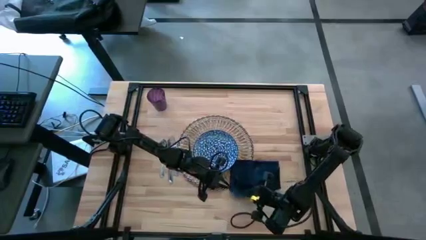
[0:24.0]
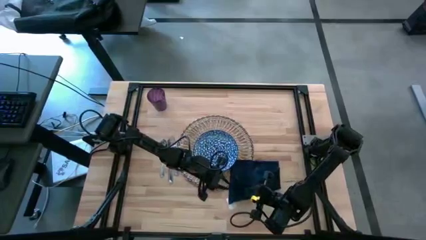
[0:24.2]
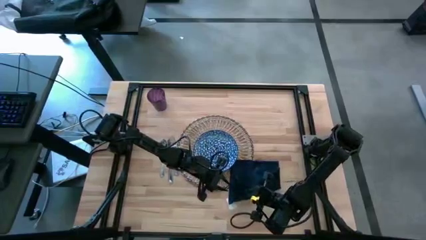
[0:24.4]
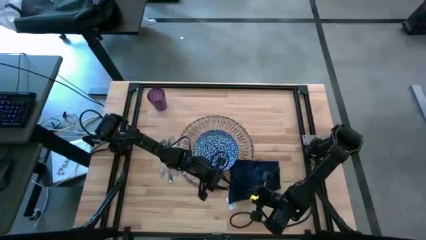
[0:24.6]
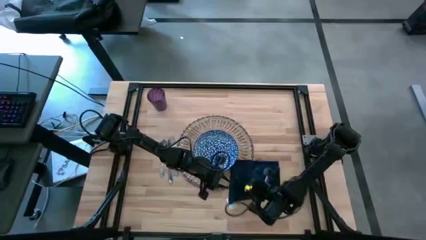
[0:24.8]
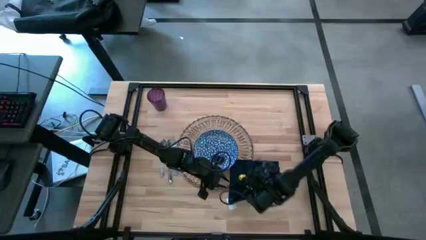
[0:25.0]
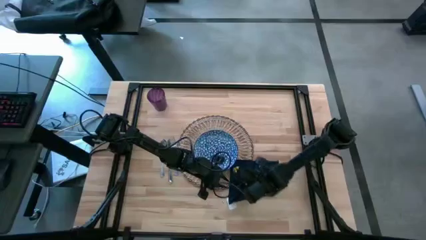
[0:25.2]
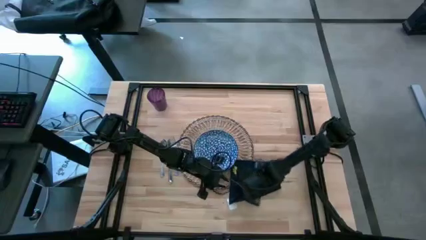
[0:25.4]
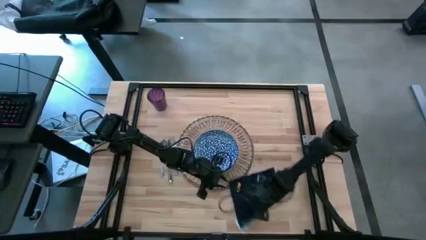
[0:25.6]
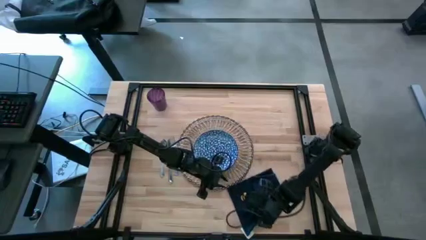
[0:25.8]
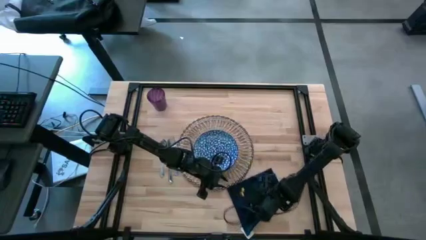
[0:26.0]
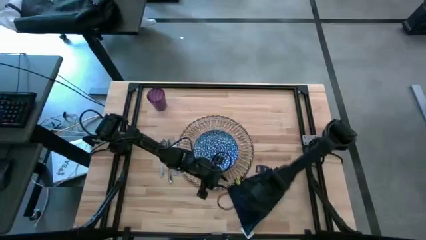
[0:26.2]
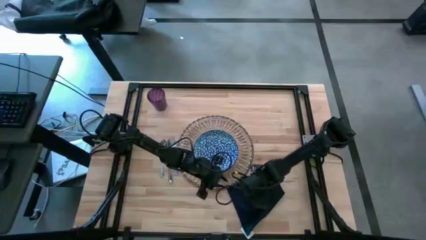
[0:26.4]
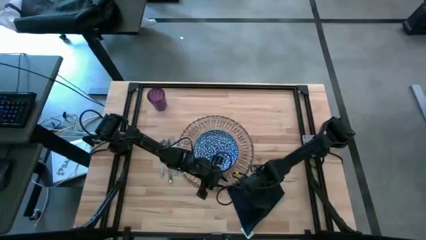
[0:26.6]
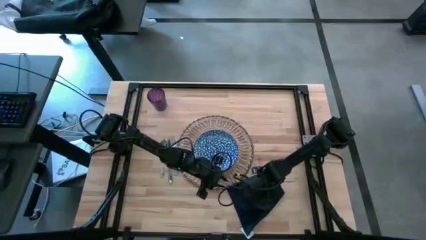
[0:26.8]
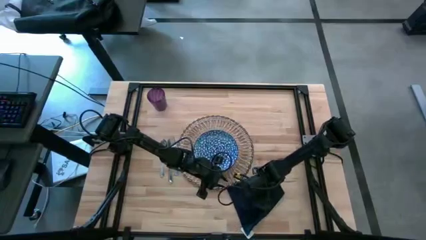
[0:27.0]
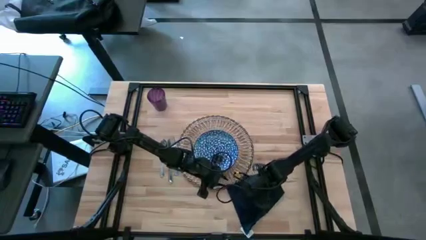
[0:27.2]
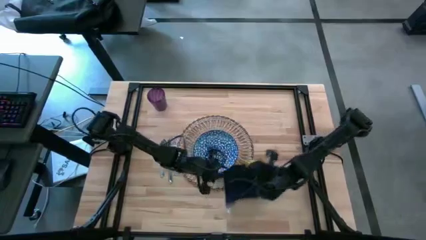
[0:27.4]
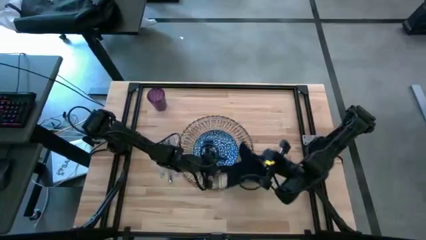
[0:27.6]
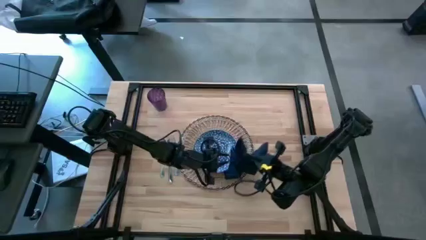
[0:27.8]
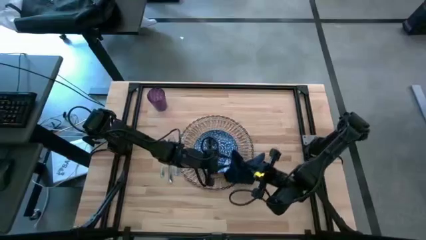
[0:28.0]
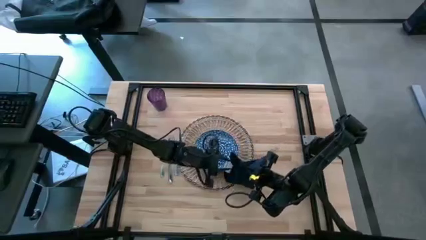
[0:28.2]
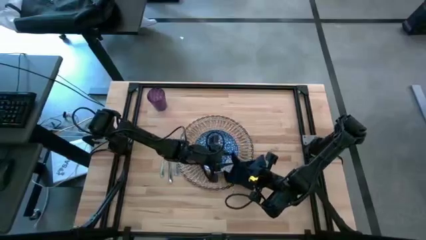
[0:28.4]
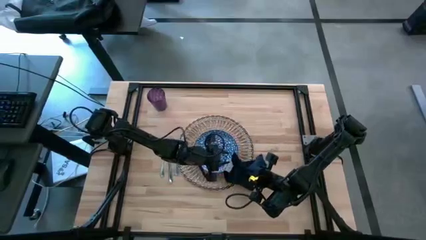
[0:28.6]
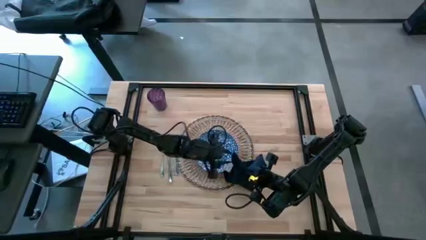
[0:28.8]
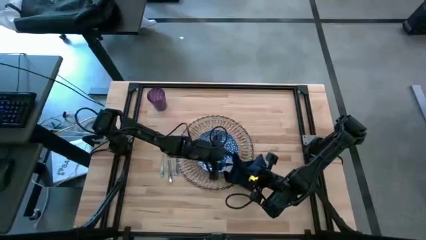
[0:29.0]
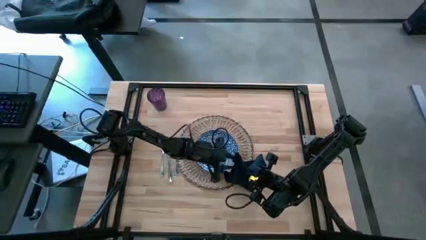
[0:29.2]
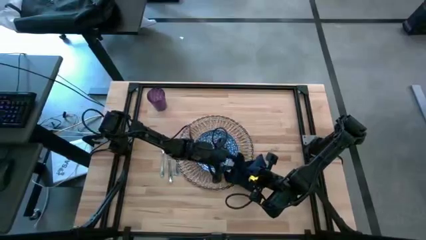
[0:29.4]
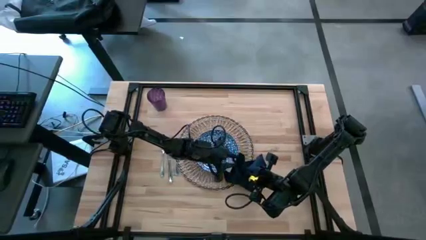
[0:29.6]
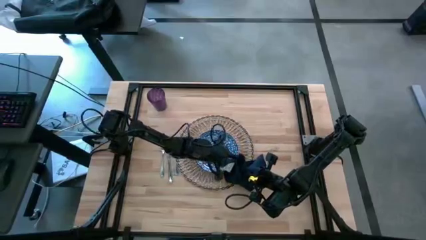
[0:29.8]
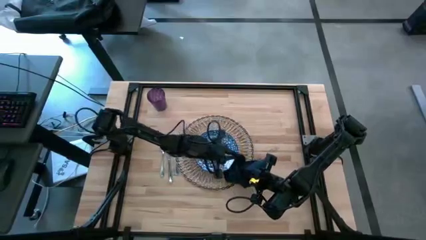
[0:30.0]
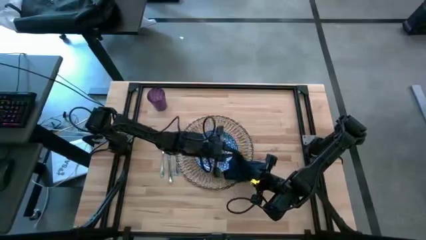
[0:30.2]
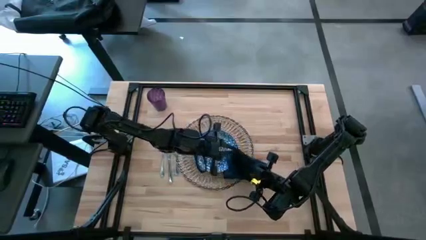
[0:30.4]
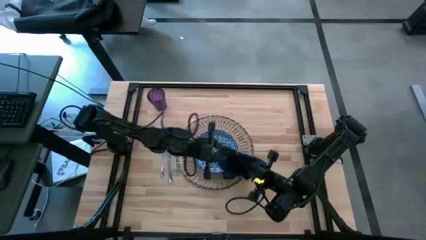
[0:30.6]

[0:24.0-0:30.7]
Task: Set table place
Fold the blue napkin

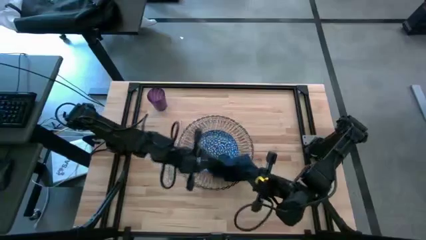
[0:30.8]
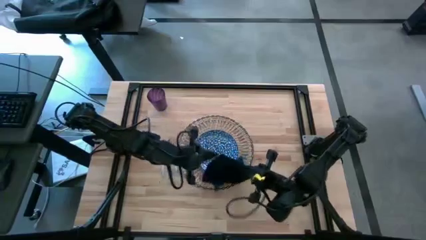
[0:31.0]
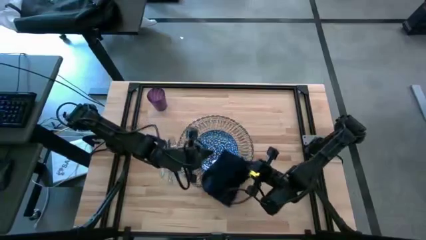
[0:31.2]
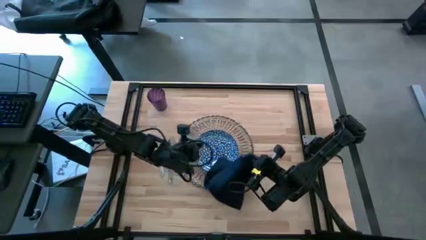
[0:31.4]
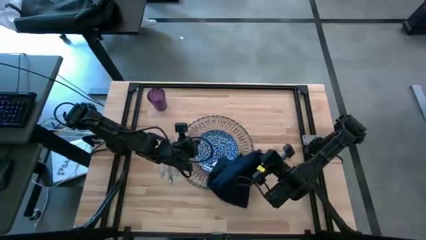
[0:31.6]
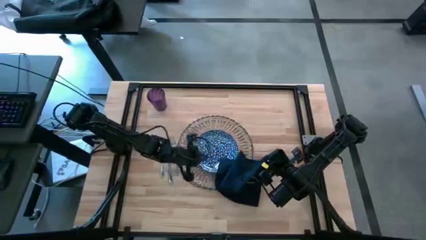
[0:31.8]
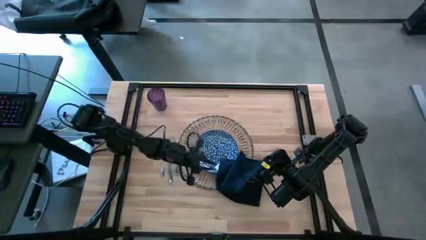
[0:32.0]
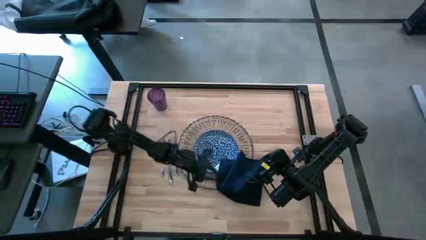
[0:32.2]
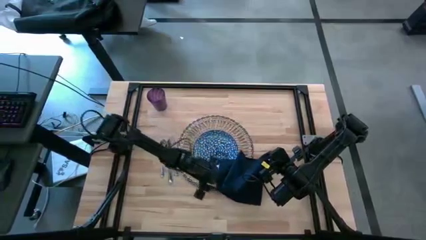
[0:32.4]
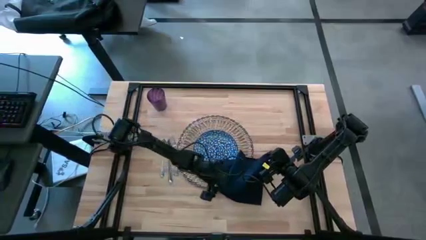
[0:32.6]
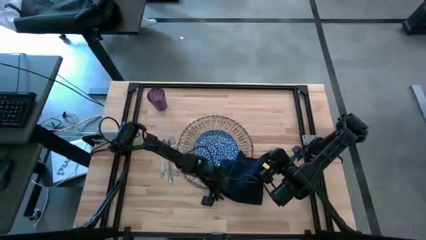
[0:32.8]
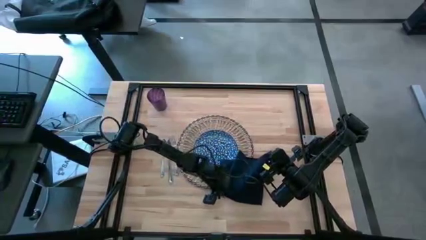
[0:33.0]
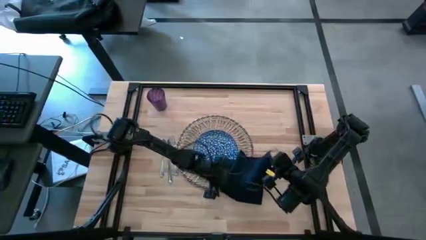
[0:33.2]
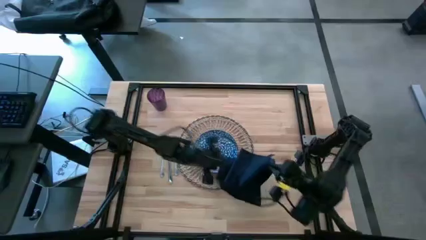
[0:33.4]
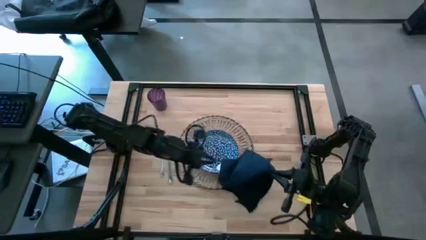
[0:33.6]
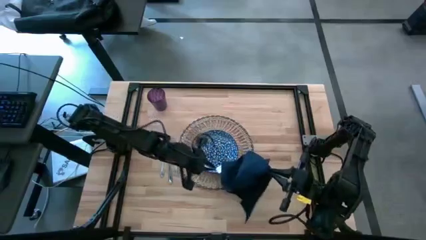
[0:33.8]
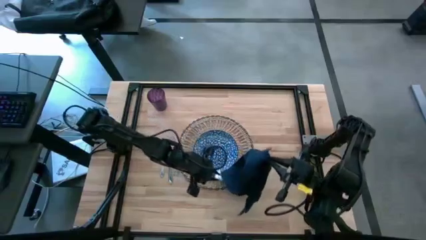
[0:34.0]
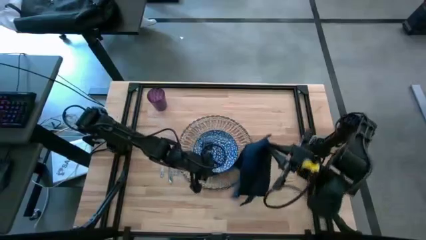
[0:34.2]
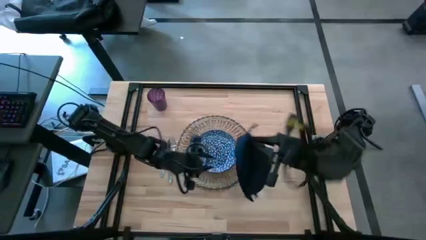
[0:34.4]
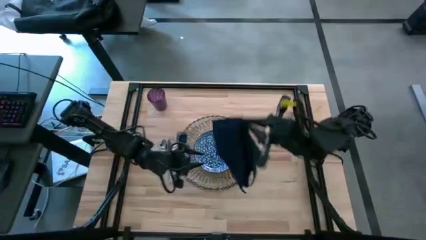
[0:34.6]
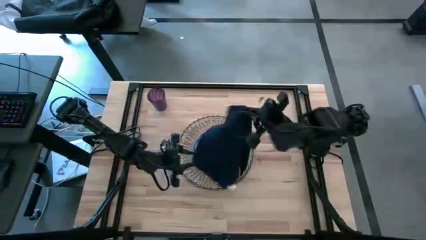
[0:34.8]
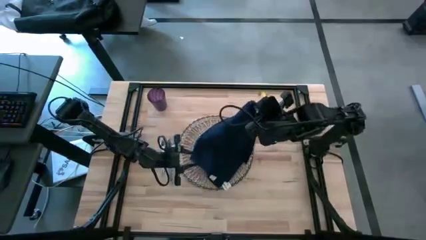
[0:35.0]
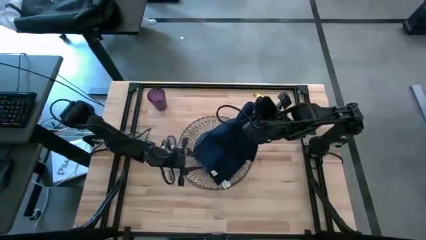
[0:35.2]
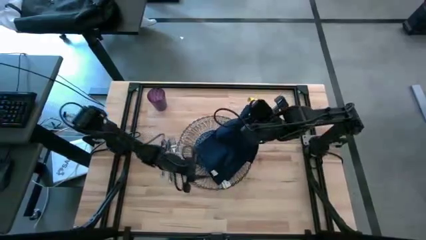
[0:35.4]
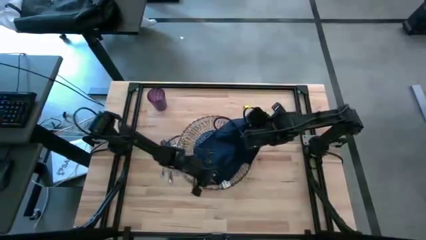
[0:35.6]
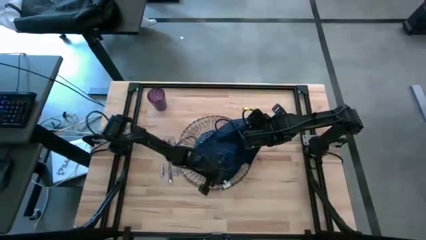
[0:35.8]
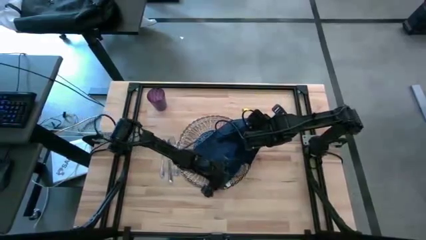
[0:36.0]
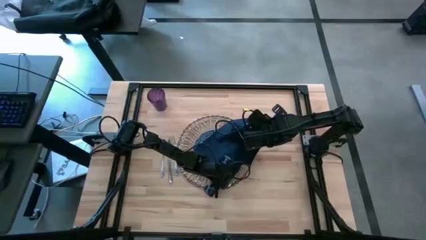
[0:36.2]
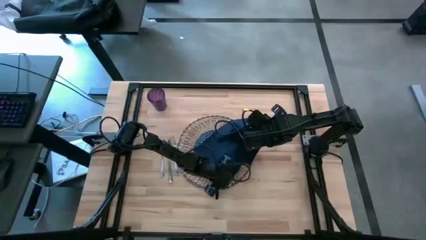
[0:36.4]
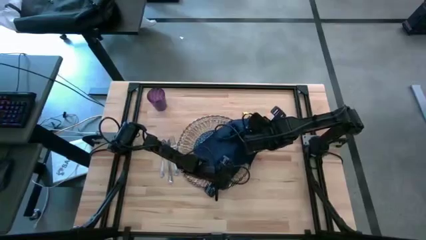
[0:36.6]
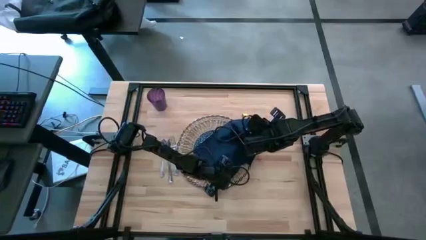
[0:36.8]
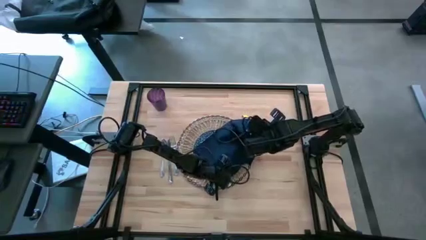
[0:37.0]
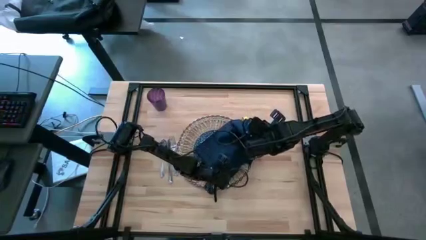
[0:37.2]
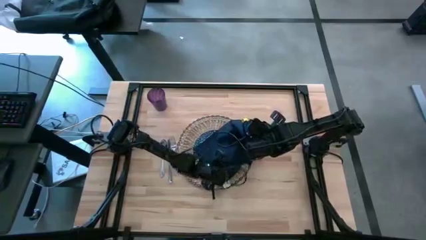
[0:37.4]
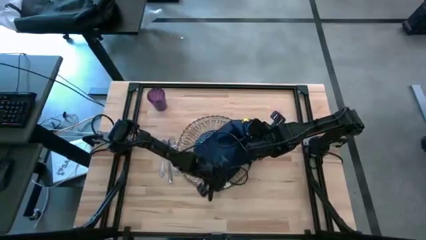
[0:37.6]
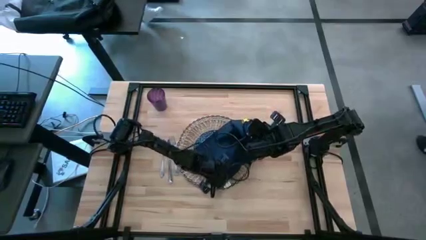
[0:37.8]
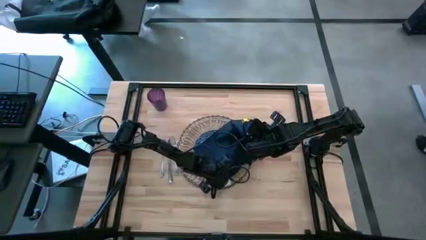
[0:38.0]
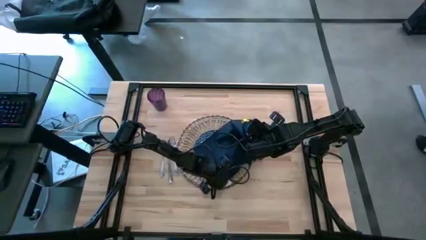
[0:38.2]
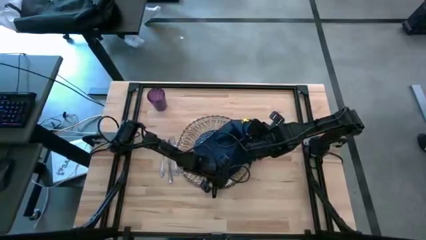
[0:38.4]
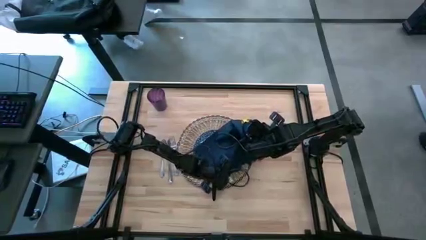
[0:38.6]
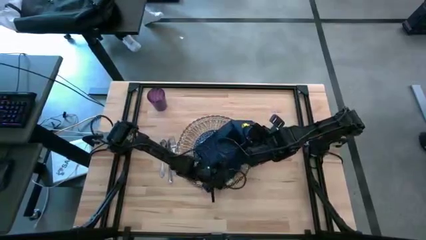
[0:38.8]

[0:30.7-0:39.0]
Fold the blue napkin
